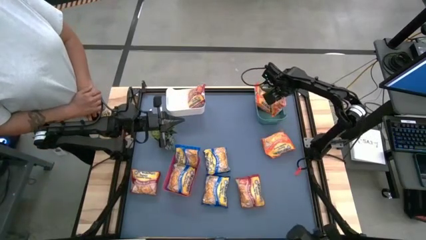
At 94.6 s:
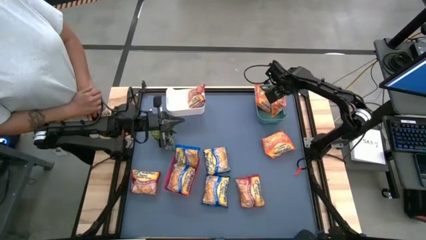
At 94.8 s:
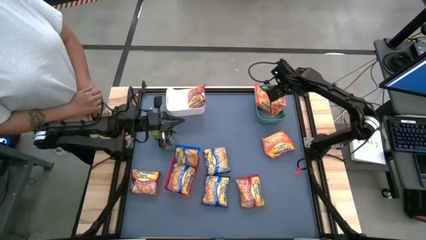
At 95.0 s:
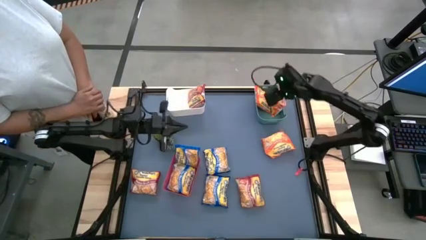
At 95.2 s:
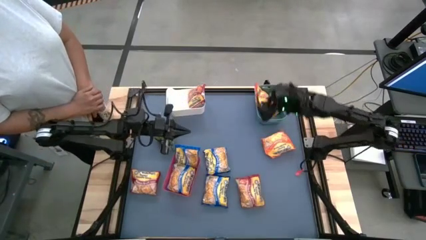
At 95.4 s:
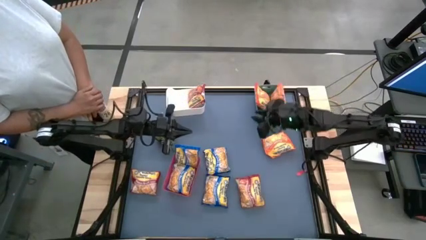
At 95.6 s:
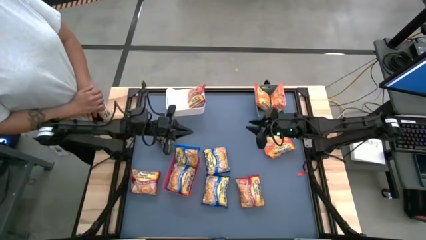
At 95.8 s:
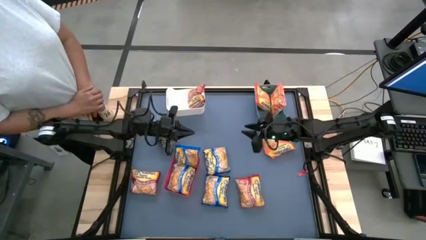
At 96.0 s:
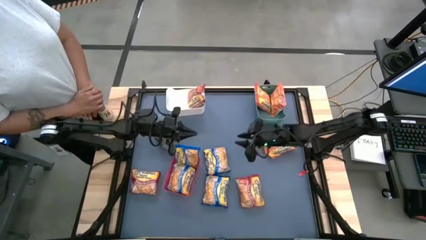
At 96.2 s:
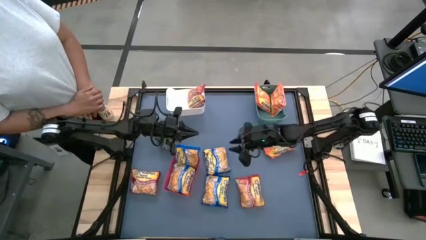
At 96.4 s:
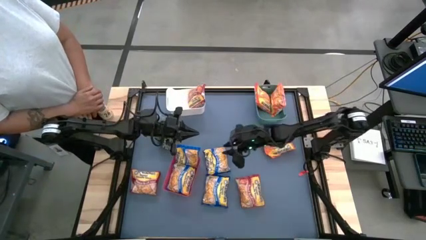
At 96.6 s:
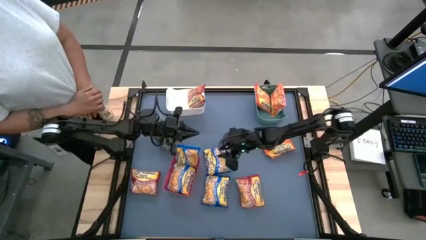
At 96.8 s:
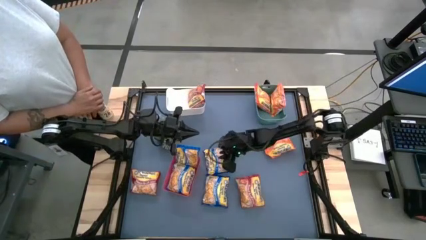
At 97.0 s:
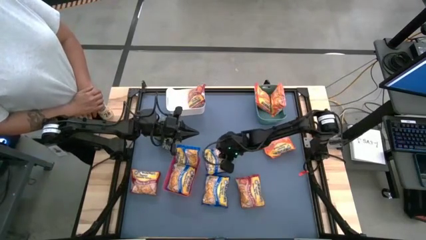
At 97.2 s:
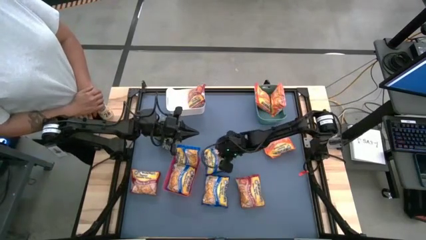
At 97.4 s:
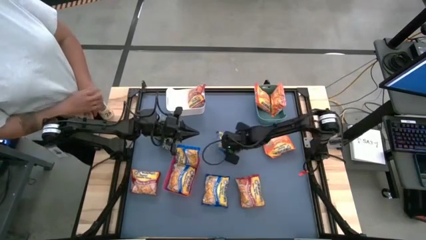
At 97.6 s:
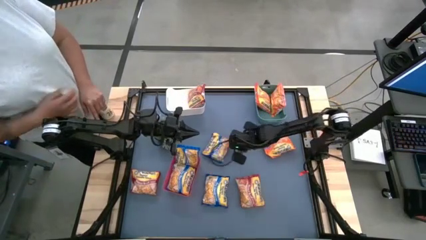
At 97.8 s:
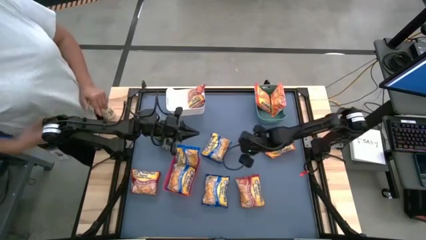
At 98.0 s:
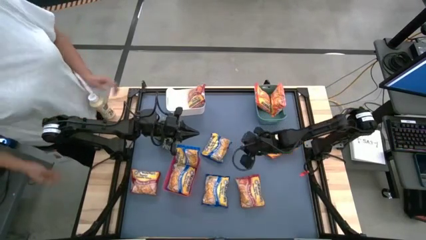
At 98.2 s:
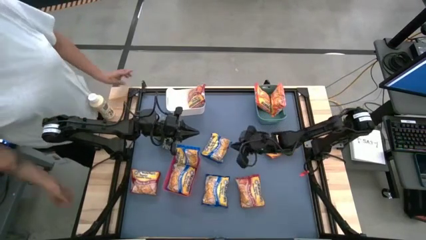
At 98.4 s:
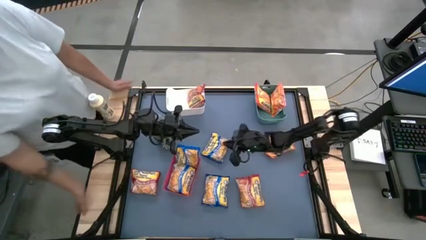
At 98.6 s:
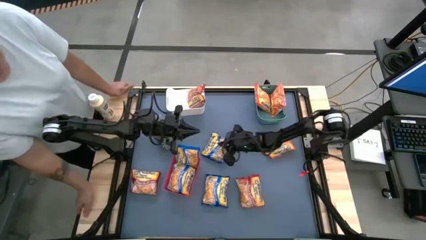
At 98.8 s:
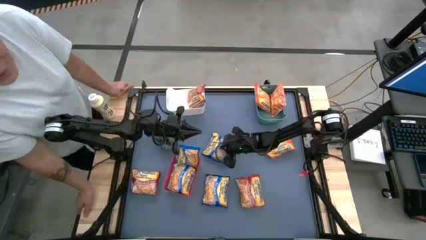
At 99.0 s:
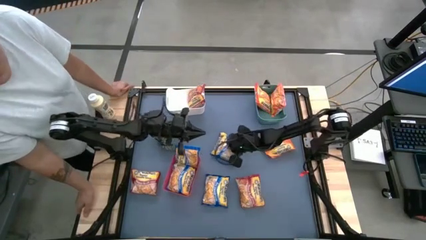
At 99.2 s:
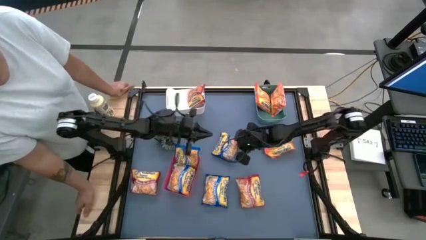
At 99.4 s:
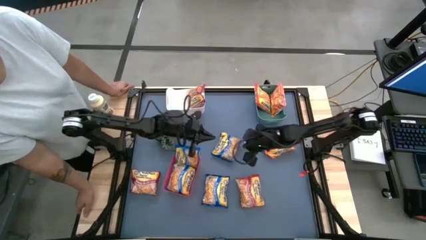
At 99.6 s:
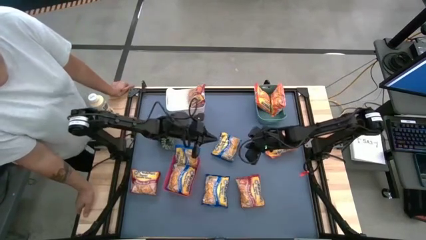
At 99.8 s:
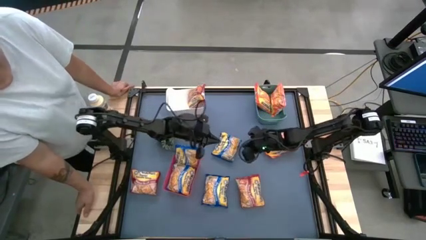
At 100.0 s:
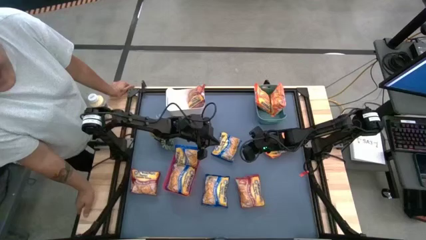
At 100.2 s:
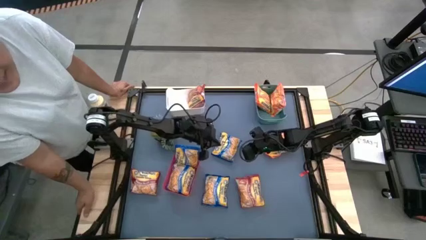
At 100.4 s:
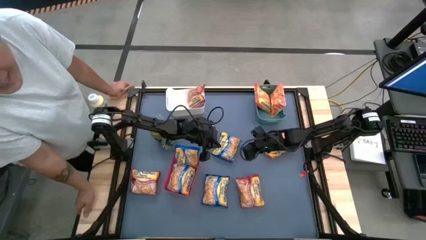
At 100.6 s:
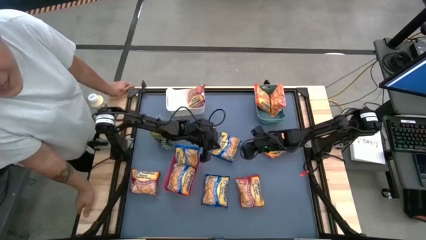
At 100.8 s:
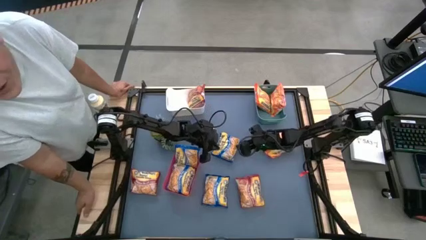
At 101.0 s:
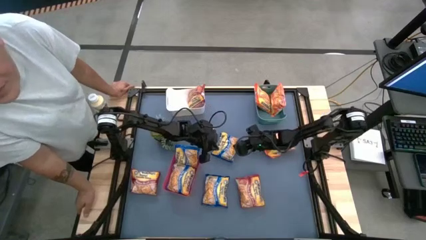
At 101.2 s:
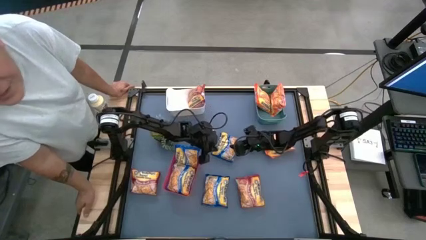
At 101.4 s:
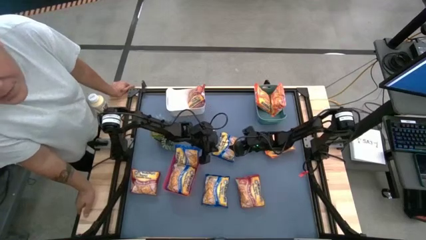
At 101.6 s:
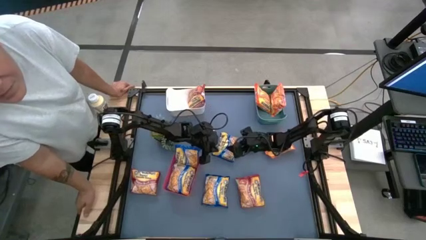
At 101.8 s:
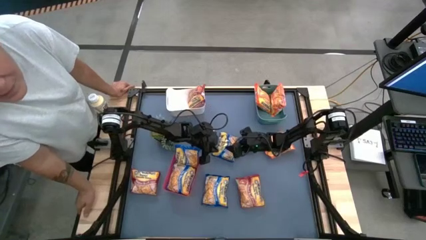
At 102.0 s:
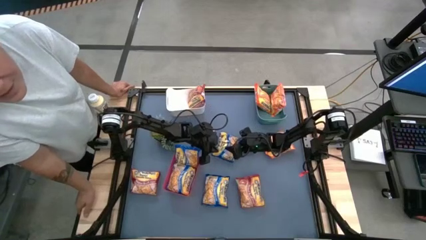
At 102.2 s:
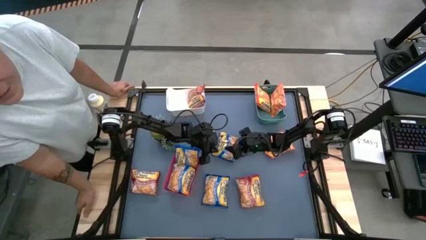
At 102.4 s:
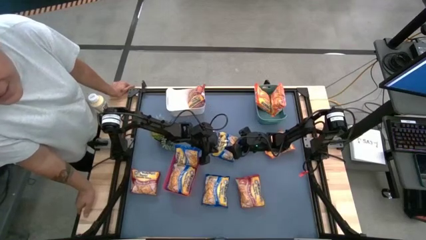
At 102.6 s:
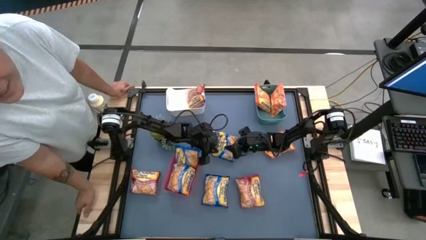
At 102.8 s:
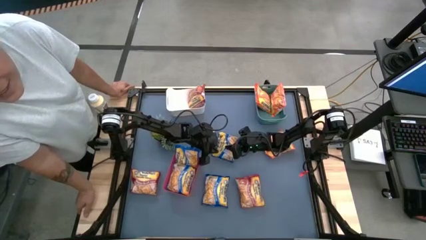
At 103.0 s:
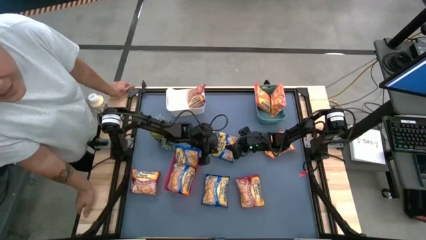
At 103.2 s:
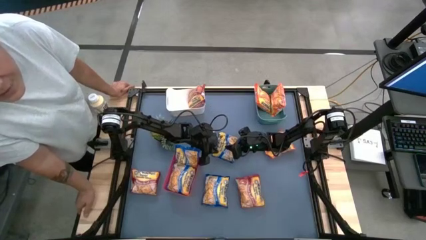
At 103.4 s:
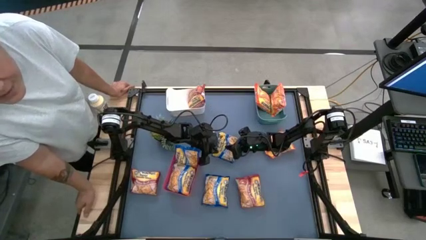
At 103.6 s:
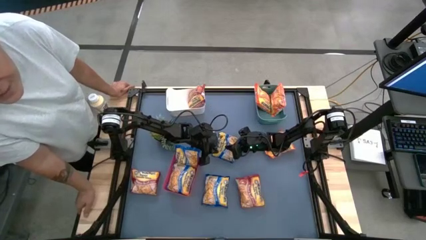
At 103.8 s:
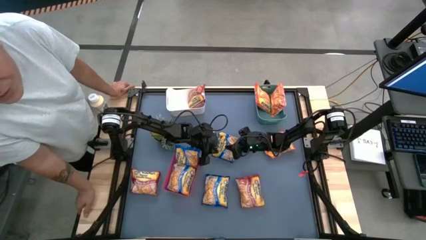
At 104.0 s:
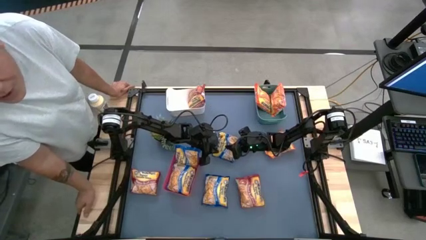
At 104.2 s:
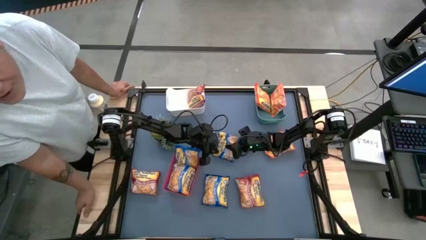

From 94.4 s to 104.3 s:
Task: Sort Maruchan noodles
Put the top blue noodle pack into the red bin

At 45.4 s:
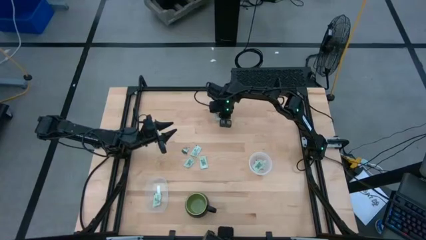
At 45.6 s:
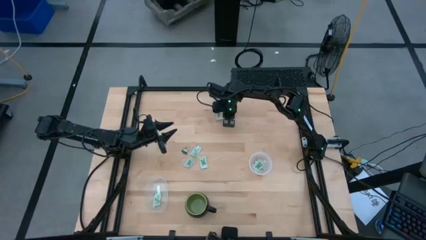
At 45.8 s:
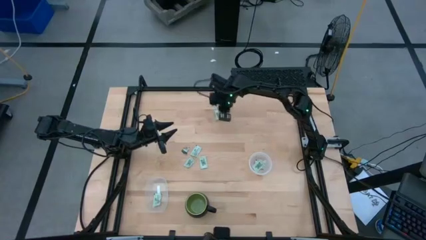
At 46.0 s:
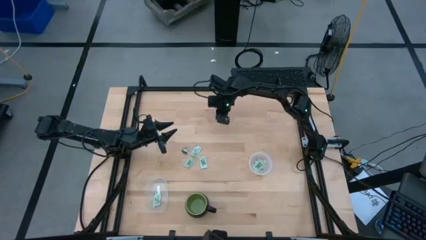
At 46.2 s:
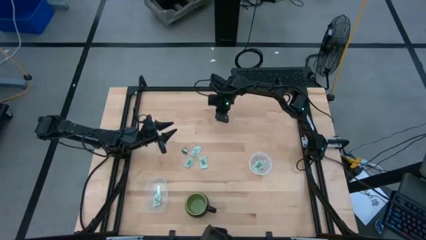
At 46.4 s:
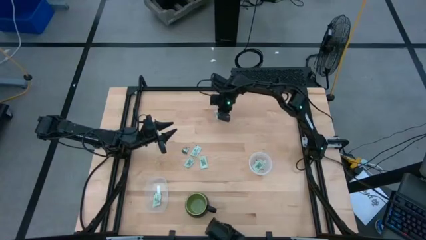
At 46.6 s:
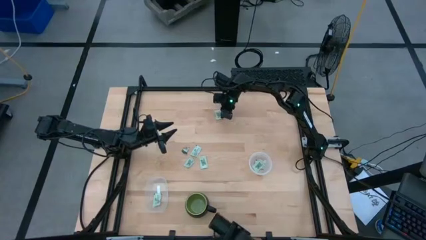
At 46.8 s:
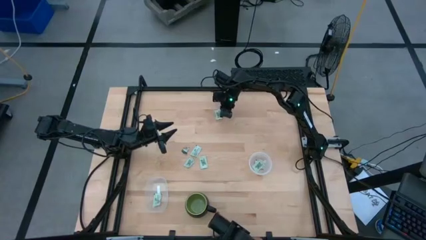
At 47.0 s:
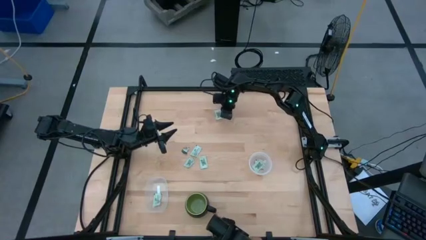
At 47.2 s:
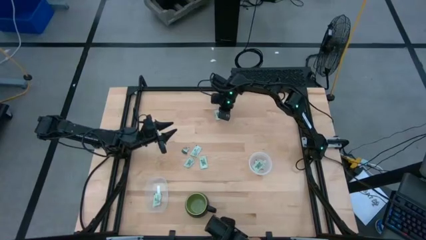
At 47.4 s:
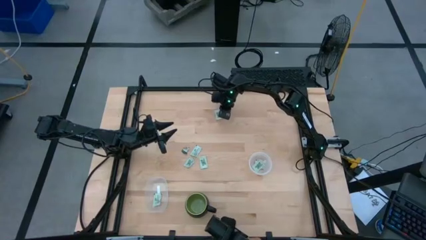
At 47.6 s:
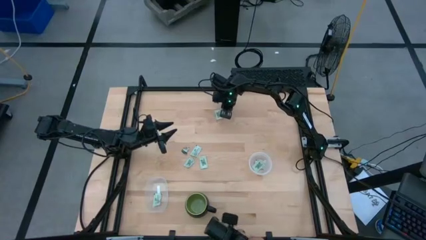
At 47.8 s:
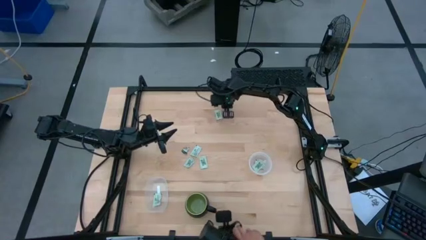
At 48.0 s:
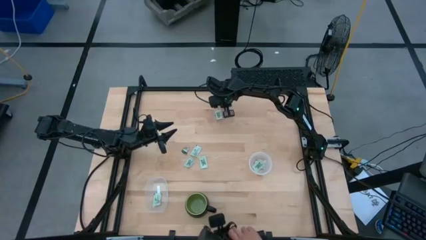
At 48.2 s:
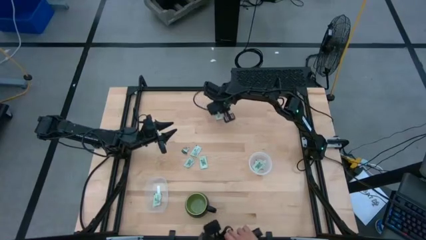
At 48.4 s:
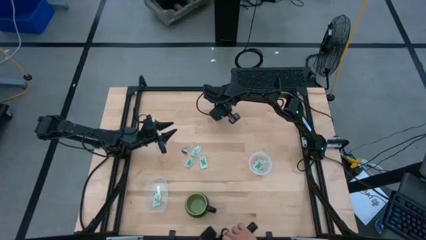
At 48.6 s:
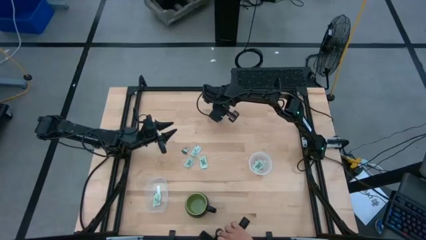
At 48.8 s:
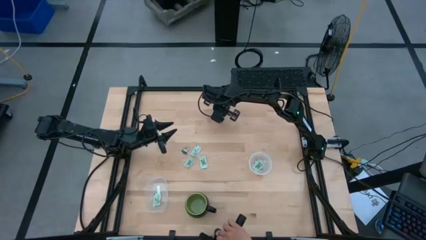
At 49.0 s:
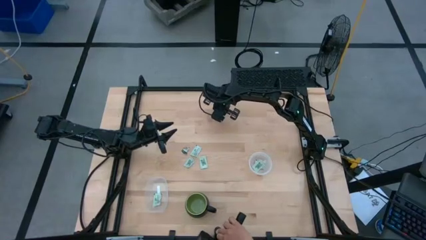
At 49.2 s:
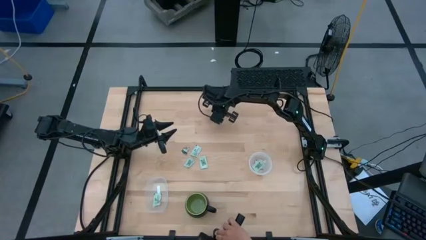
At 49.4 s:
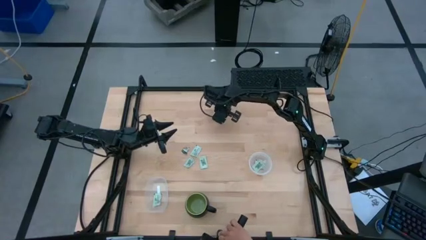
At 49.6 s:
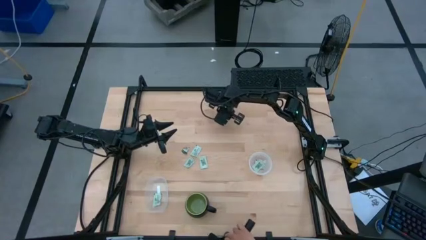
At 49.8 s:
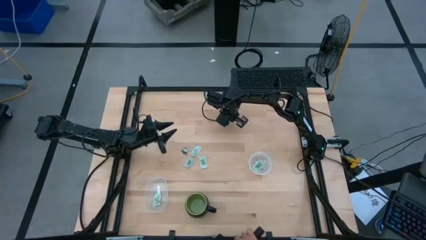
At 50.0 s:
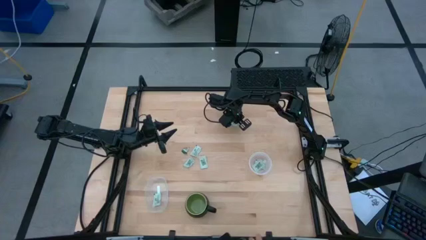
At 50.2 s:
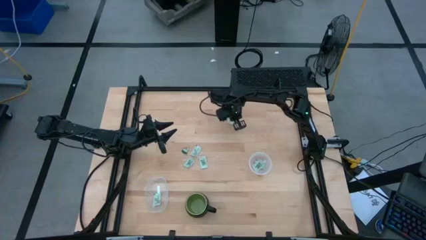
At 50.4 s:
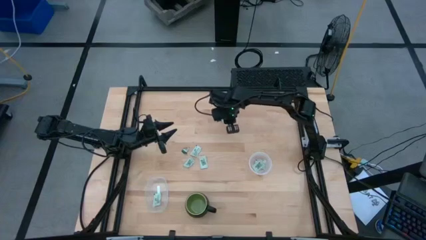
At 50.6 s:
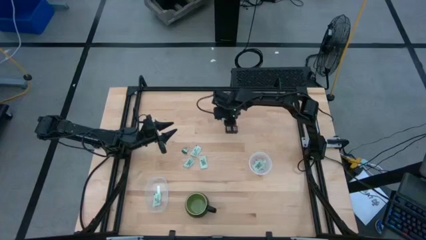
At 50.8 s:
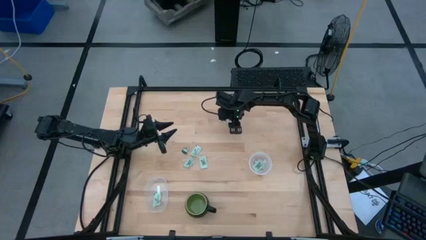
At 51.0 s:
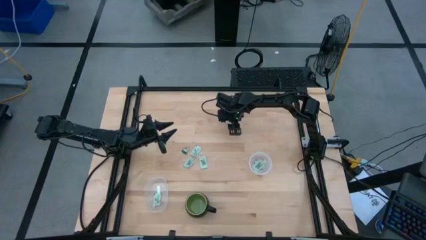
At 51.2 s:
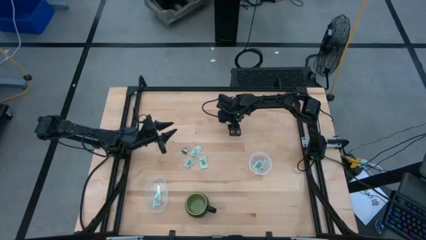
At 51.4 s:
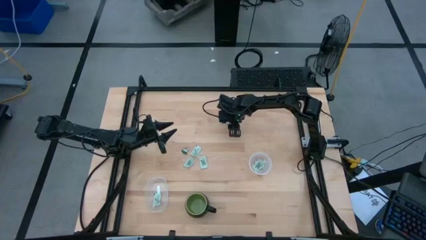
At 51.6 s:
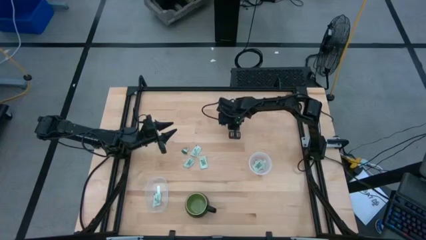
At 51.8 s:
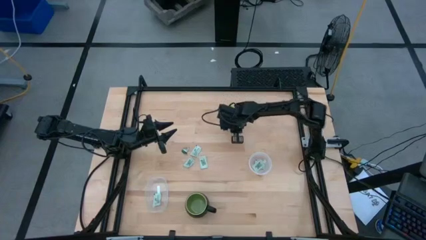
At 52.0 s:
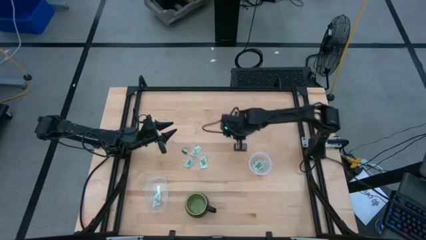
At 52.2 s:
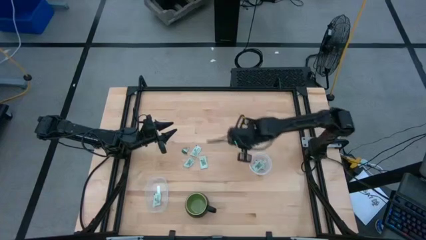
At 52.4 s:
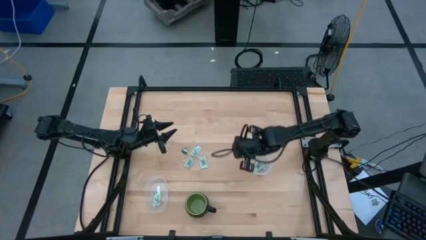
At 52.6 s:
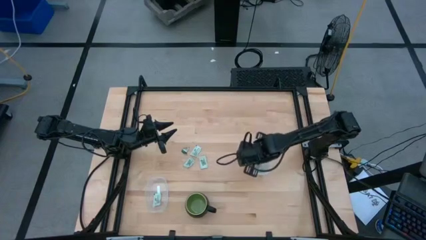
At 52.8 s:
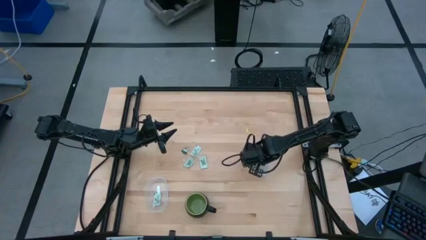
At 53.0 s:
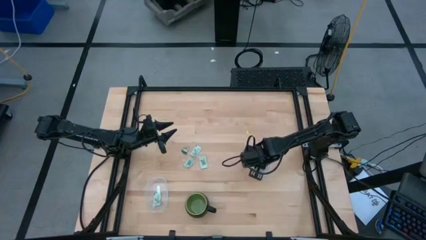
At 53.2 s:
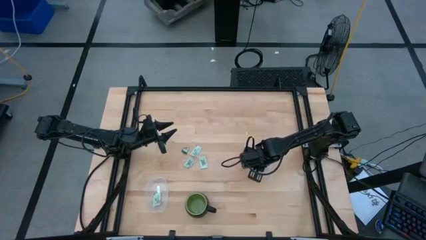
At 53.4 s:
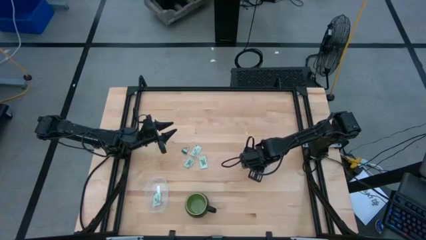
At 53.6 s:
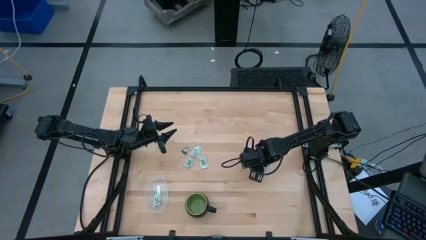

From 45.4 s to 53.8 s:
Task: Pick and place Stevia / Truvia into bins
Put the white stevia packet into the circular transparent container
